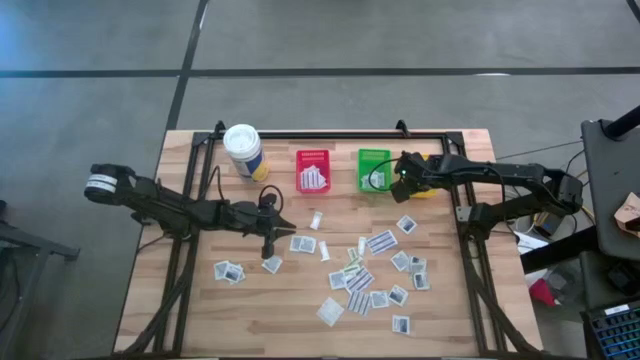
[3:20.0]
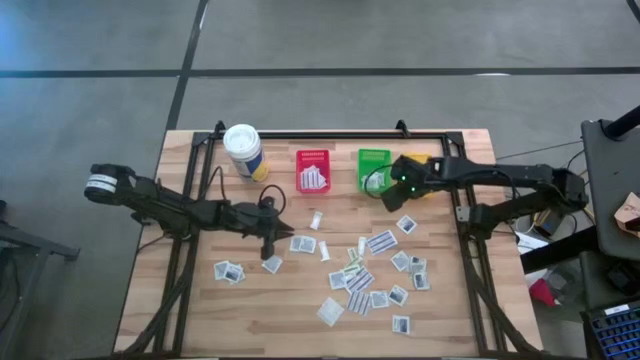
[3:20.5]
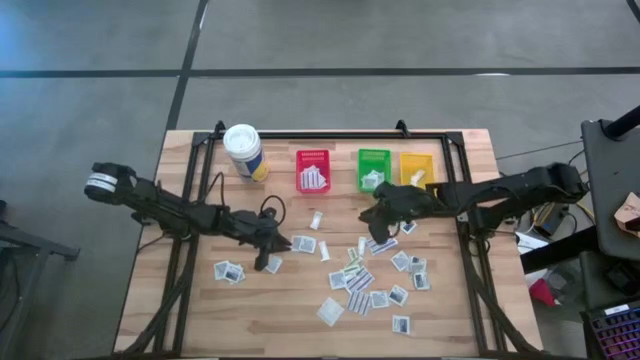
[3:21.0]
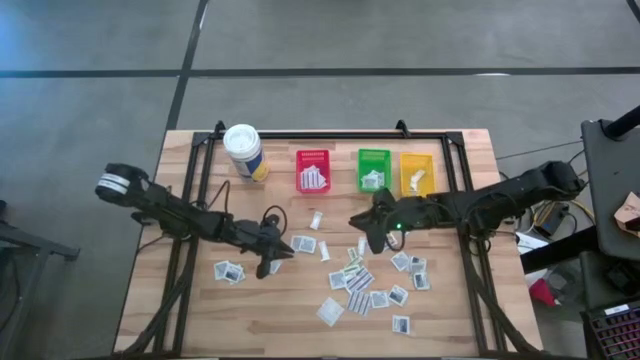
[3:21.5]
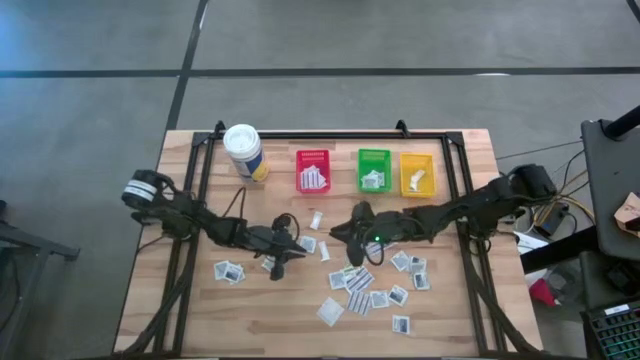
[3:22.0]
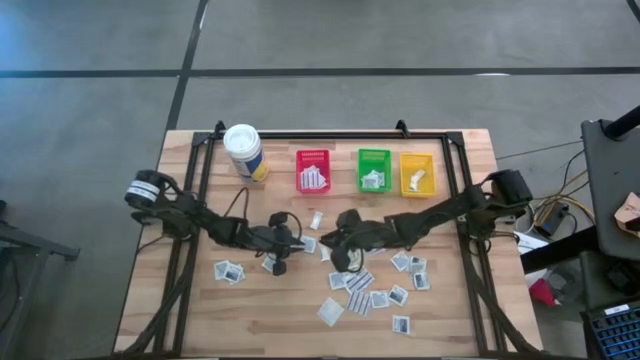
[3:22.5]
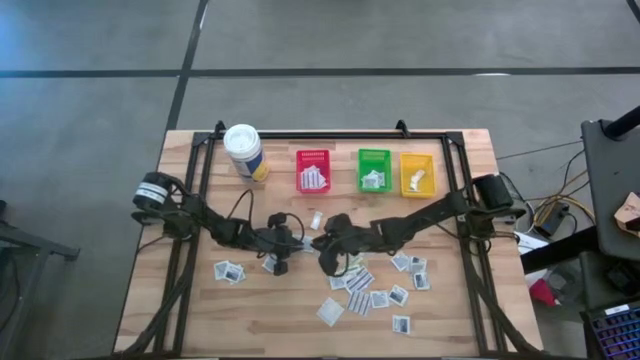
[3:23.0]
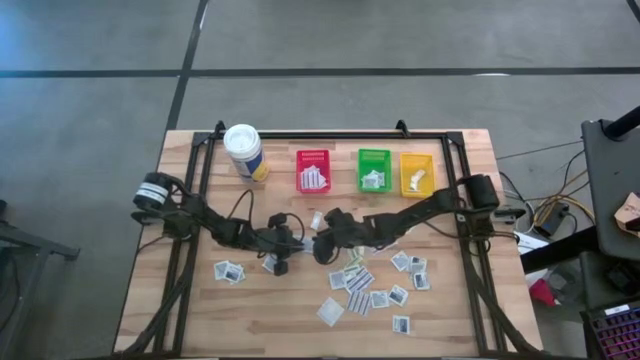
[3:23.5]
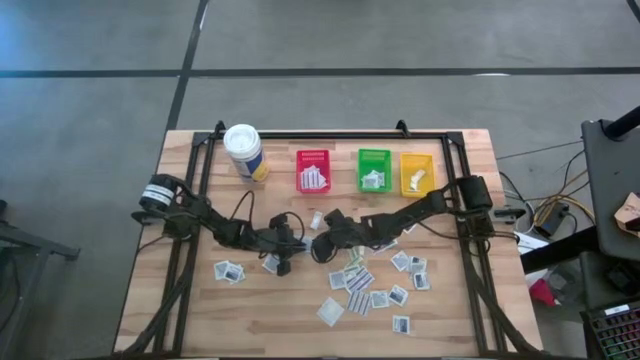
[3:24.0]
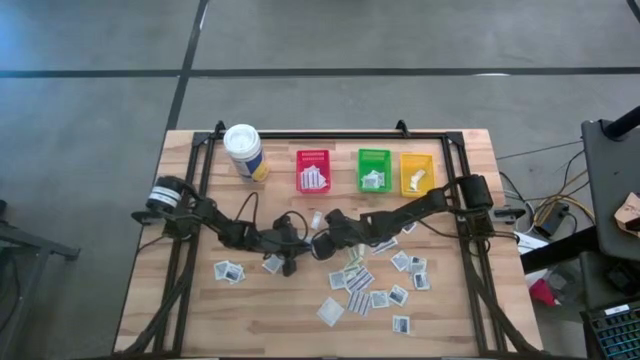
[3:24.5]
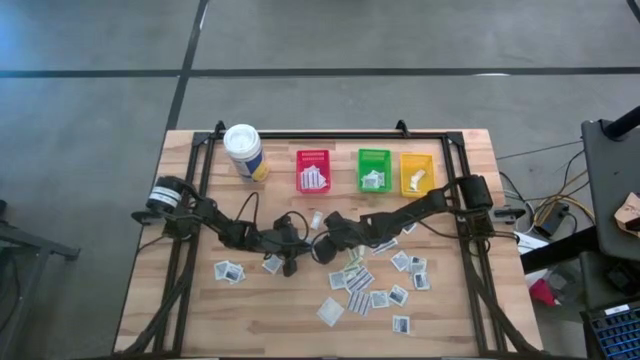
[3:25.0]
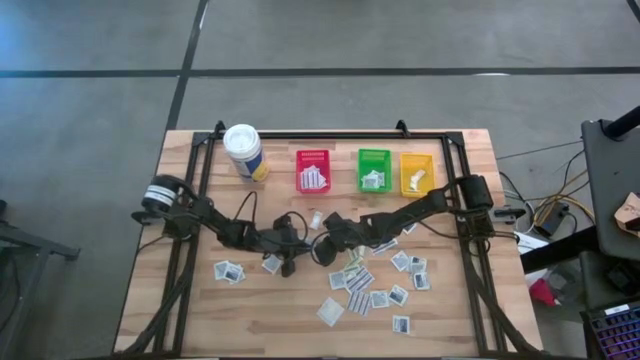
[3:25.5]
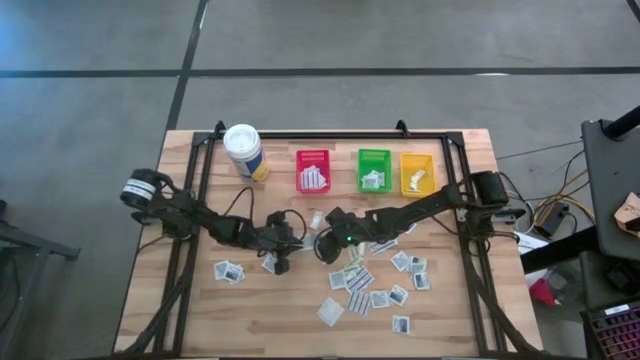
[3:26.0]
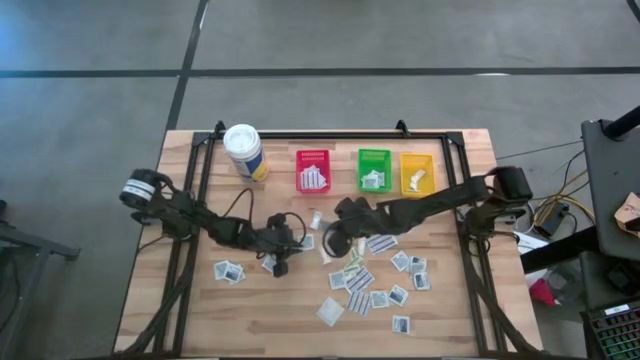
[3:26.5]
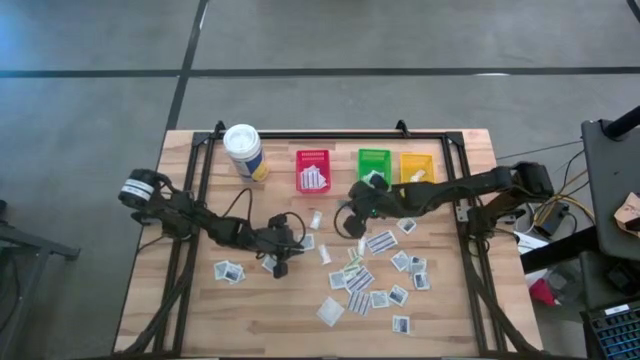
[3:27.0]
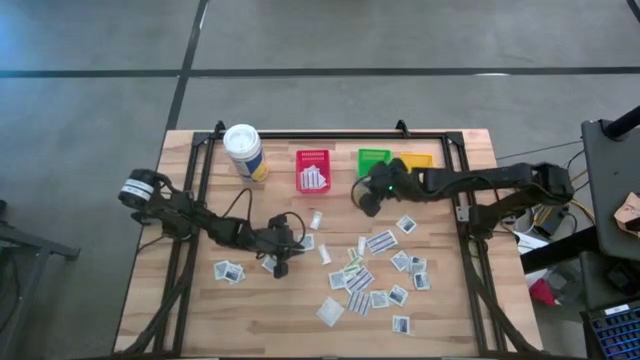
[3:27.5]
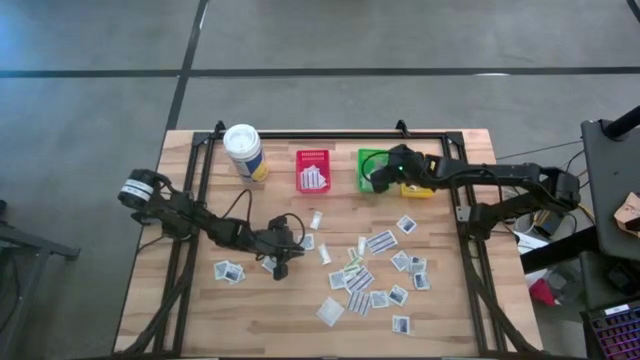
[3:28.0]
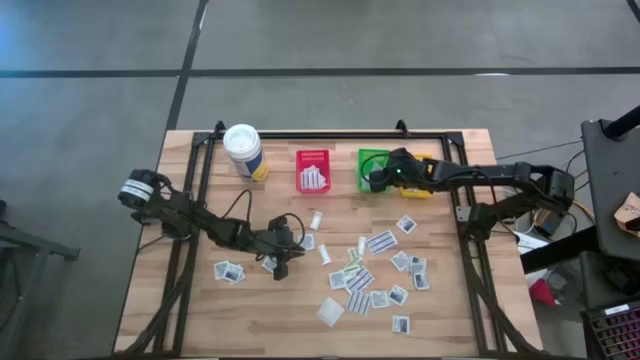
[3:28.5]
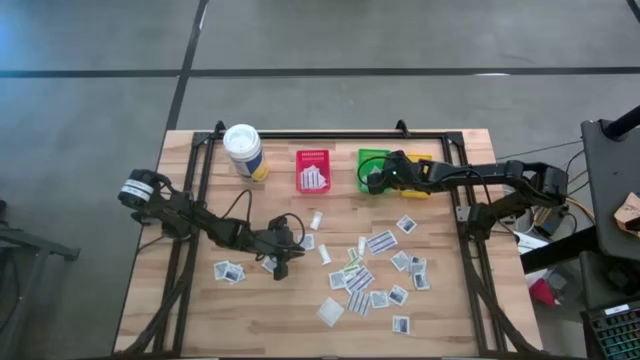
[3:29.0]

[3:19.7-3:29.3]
Task: Pick & Place First Aid Supplies
Put the alcohol pad in the green bin

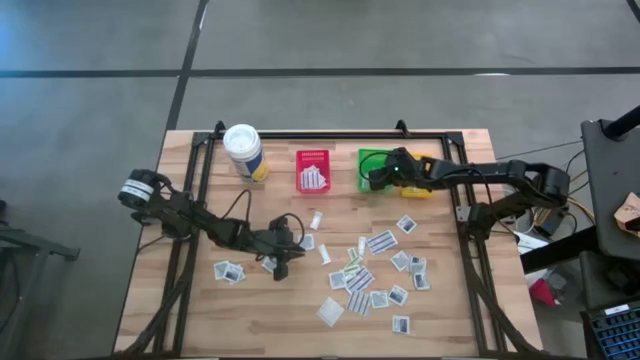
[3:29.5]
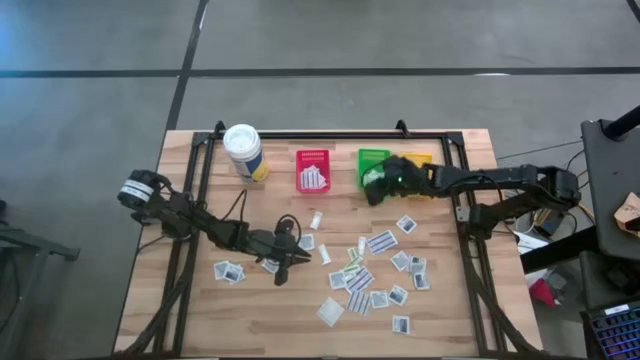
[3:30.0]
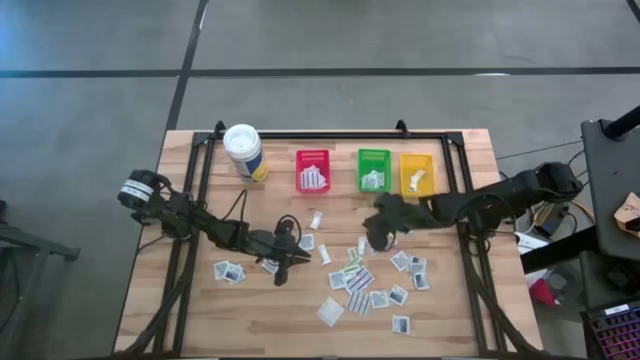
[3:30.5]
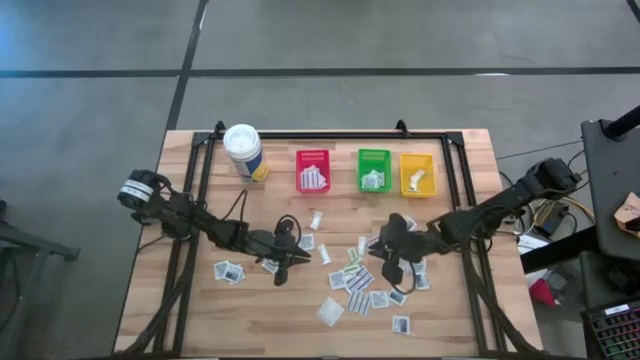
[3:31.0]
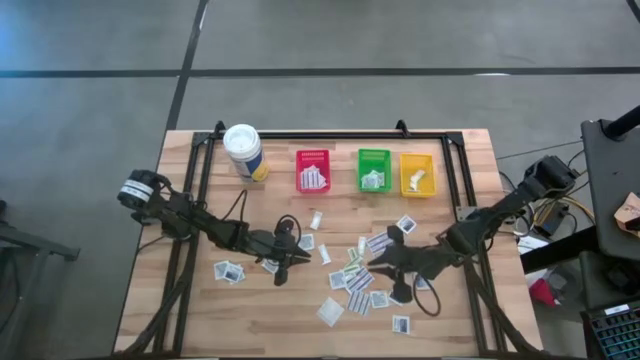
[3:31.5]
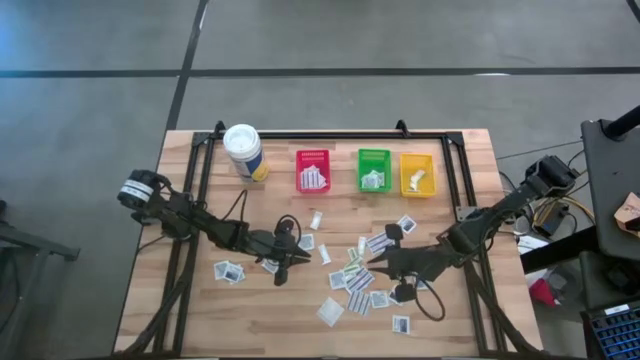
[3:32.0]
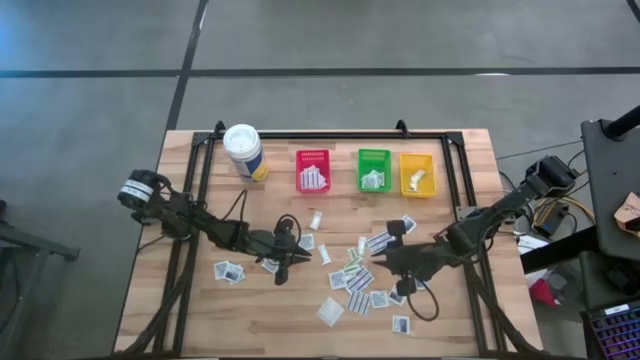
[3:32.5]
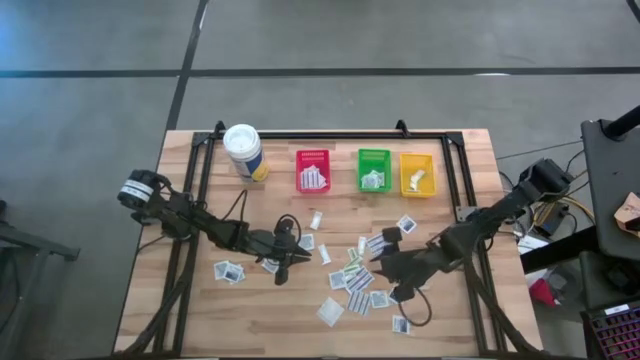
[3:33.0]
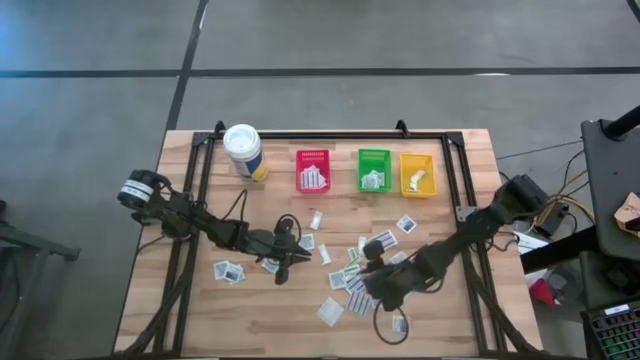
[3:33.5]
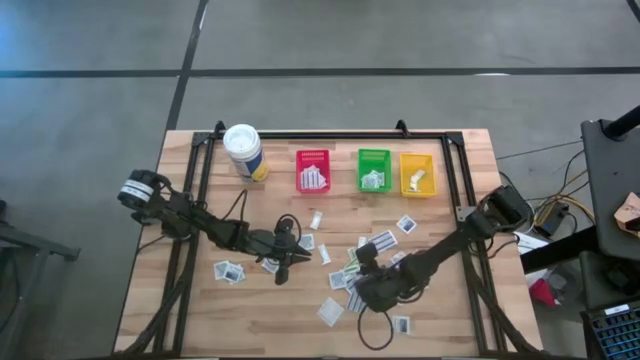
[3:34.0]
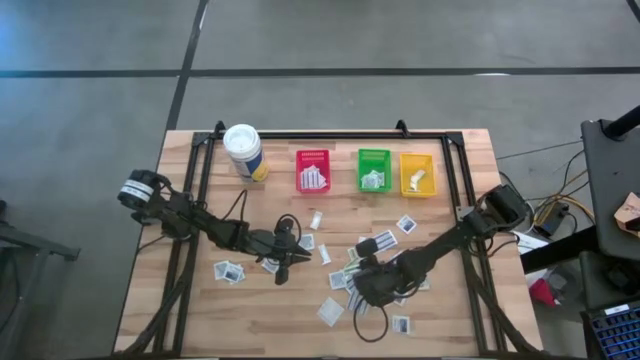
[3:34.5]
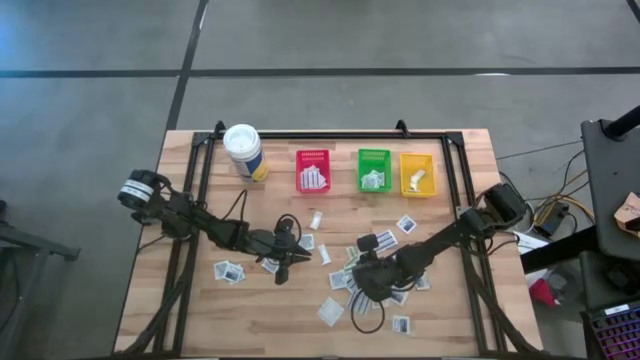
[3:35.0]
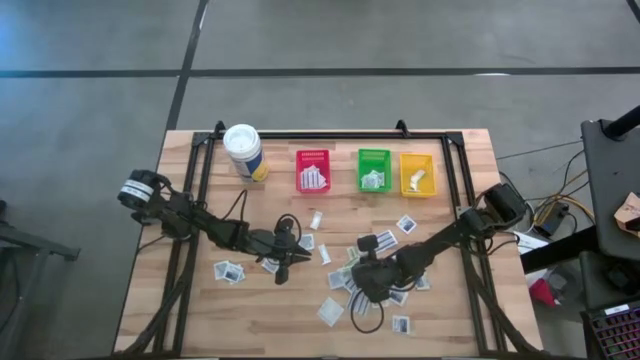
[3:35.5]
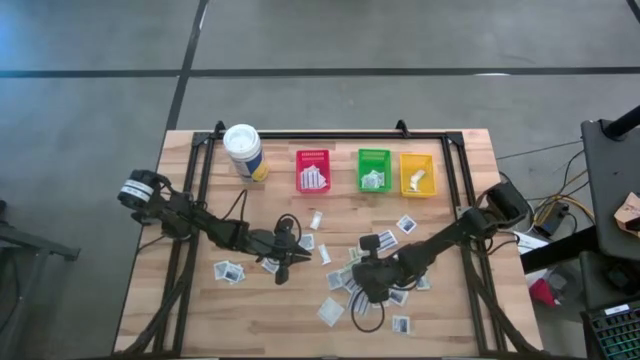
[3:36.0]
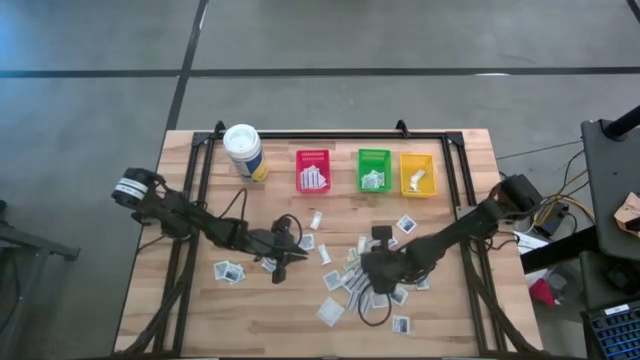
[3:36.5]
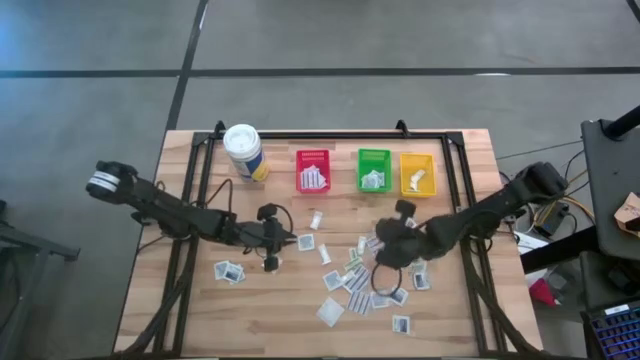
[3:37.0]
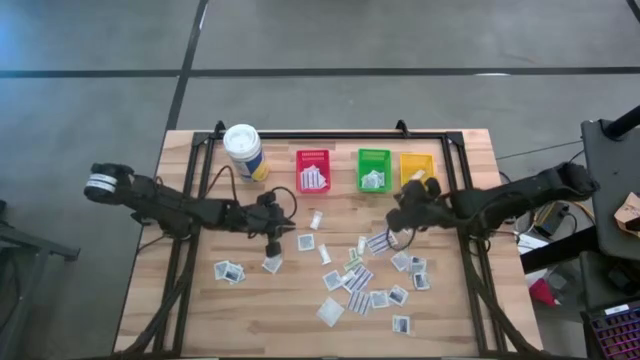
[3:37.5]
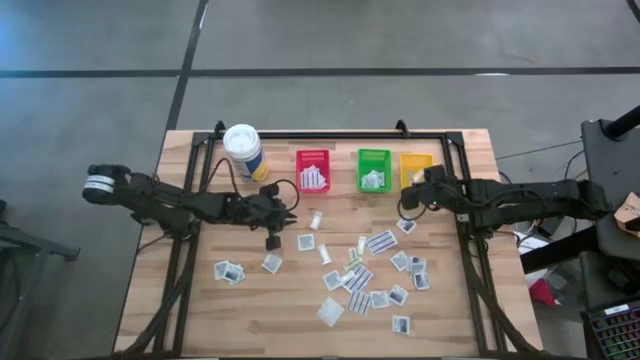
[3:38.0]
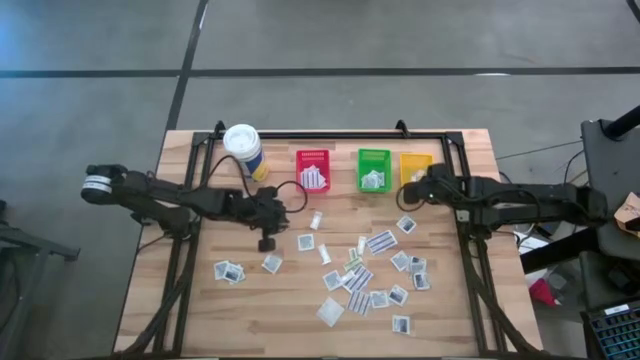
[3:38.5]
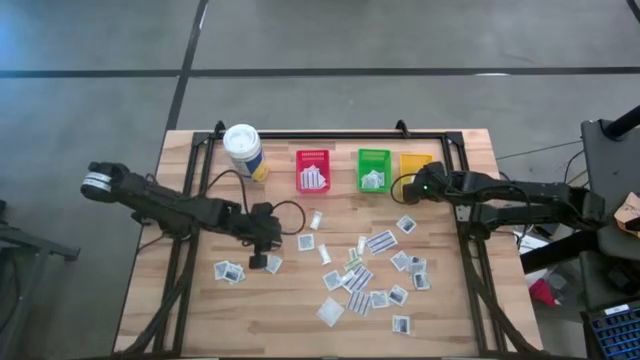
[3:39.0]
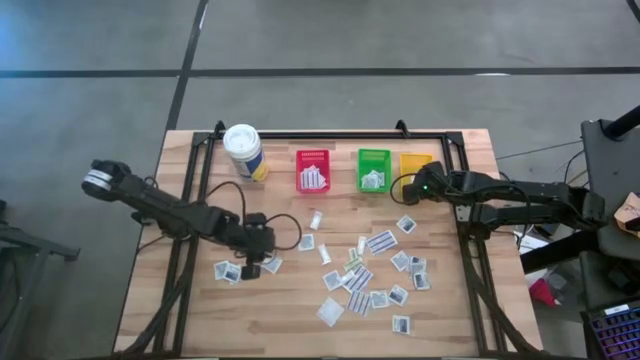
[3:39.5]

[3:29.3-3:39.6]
Put the green bandage in the yellow bin
